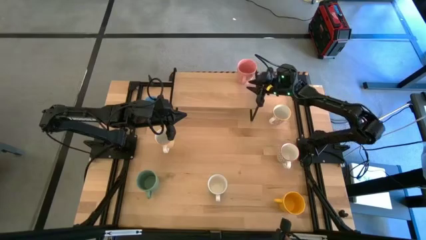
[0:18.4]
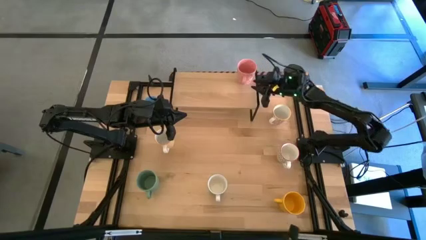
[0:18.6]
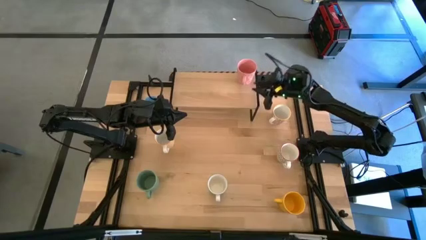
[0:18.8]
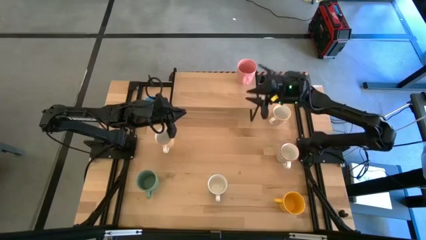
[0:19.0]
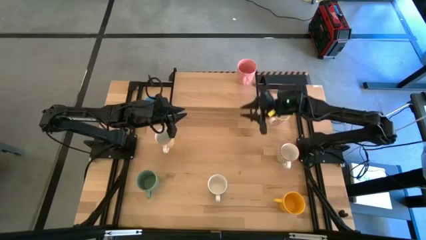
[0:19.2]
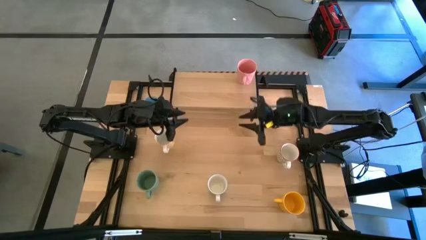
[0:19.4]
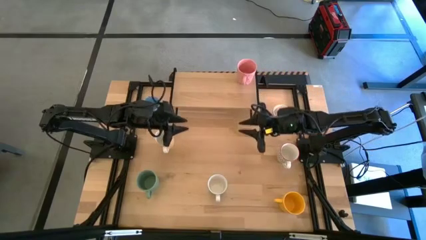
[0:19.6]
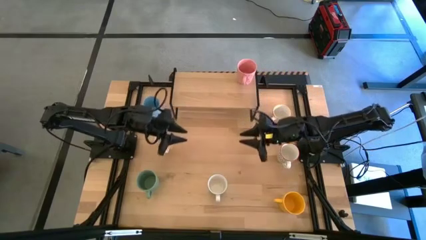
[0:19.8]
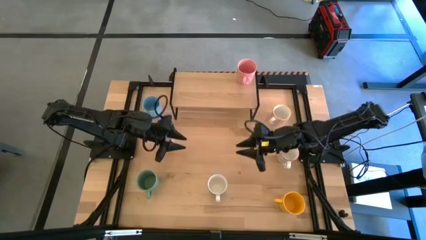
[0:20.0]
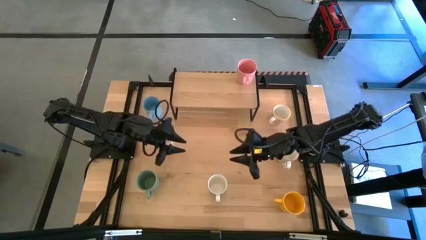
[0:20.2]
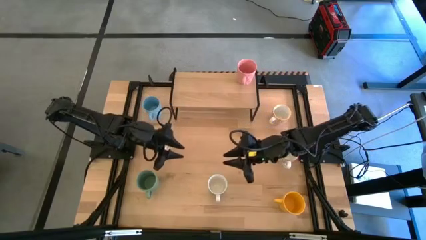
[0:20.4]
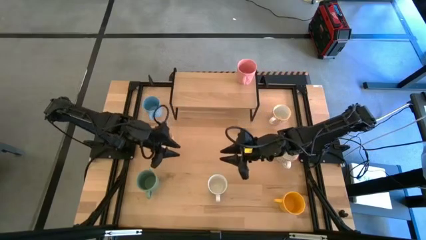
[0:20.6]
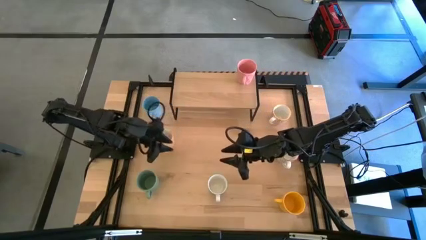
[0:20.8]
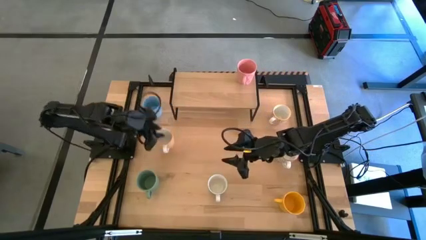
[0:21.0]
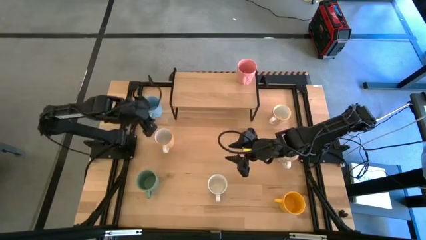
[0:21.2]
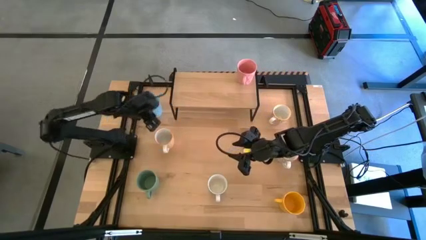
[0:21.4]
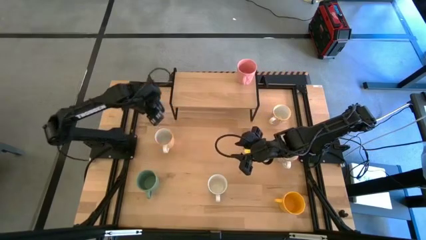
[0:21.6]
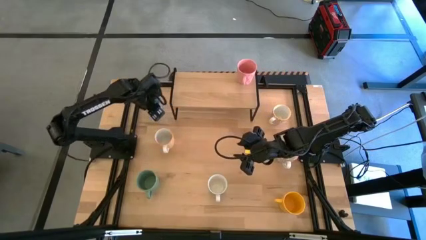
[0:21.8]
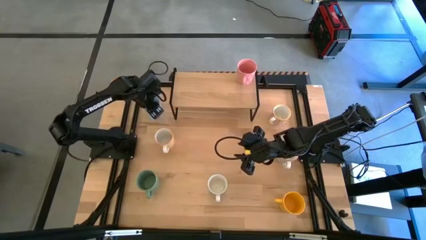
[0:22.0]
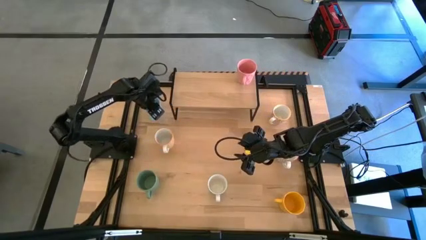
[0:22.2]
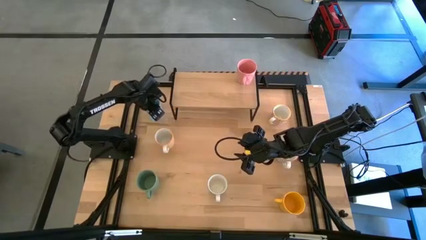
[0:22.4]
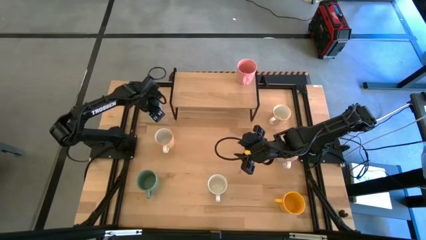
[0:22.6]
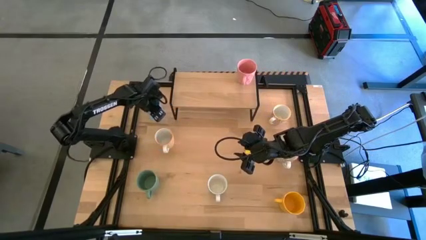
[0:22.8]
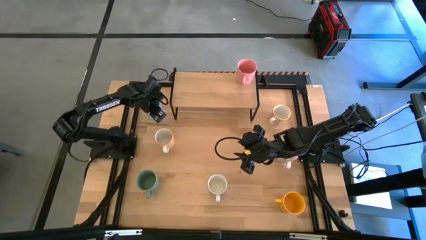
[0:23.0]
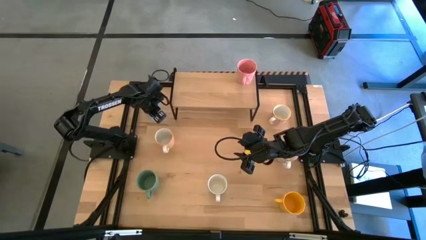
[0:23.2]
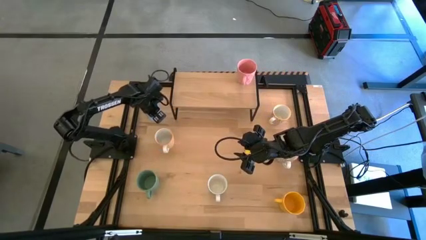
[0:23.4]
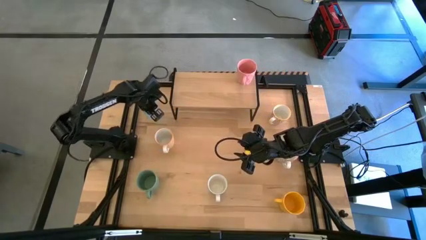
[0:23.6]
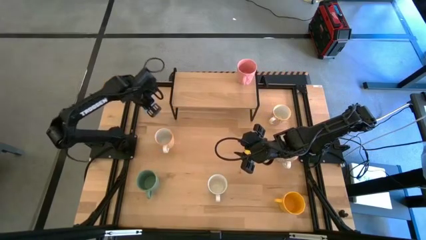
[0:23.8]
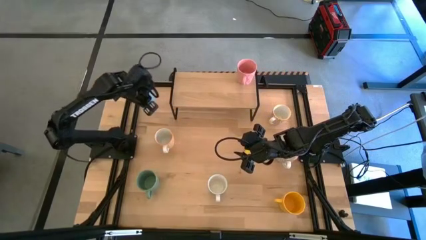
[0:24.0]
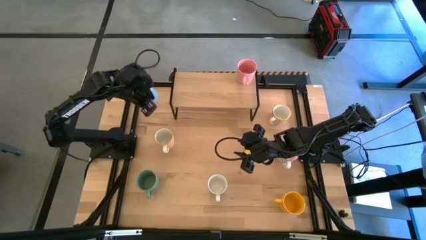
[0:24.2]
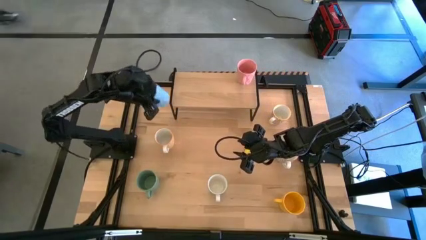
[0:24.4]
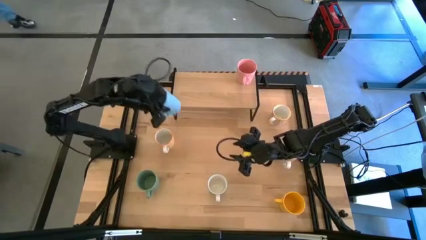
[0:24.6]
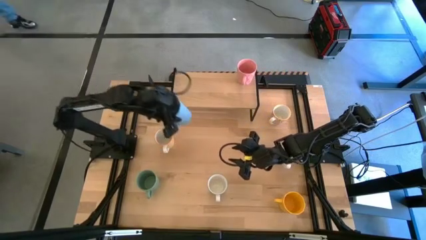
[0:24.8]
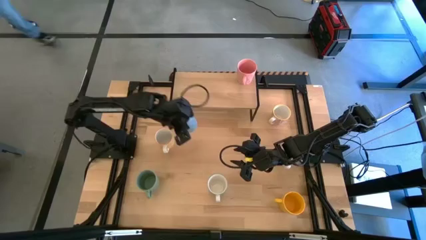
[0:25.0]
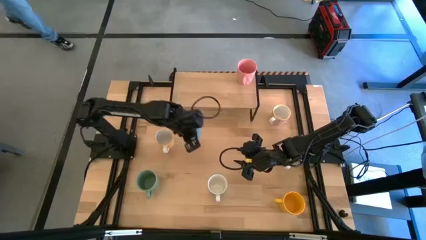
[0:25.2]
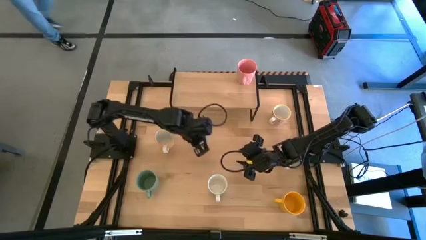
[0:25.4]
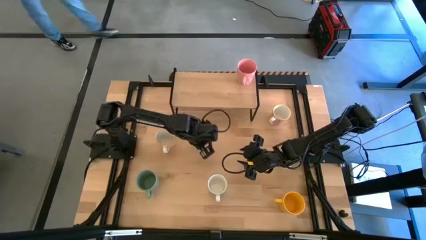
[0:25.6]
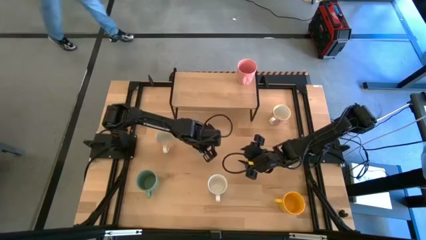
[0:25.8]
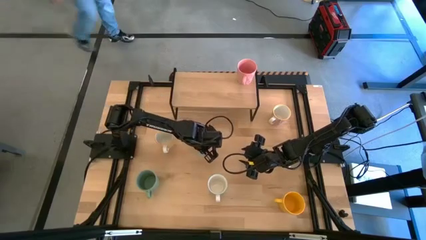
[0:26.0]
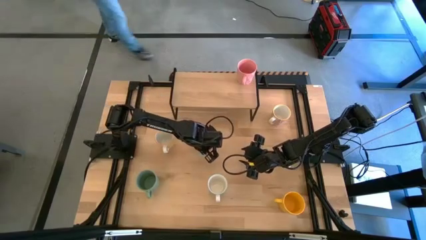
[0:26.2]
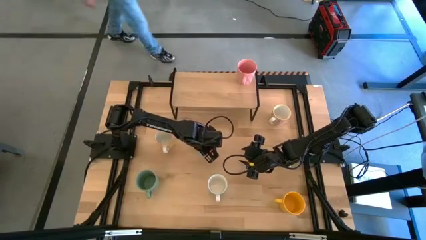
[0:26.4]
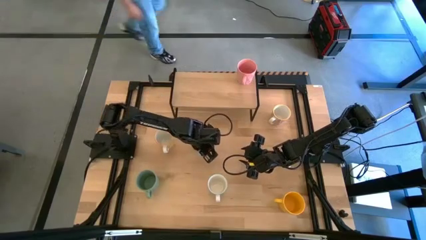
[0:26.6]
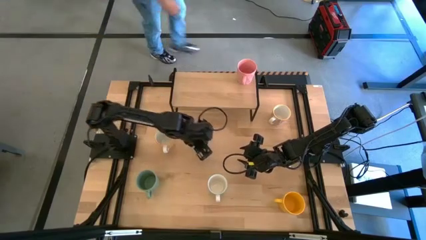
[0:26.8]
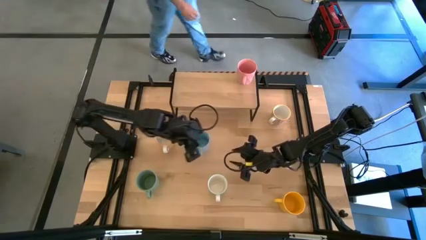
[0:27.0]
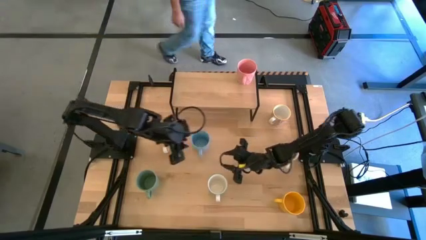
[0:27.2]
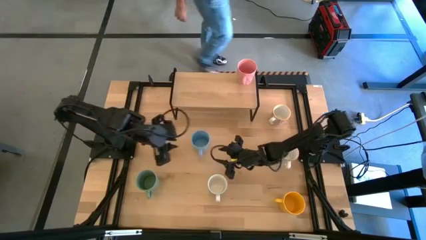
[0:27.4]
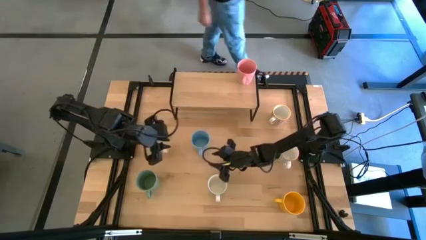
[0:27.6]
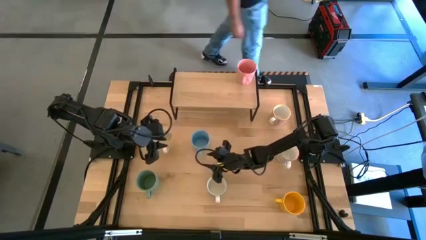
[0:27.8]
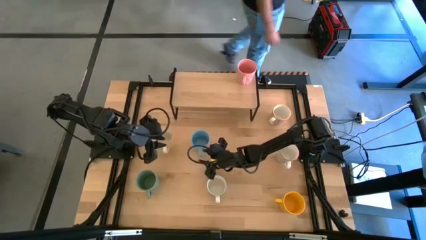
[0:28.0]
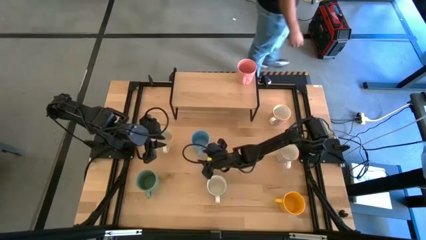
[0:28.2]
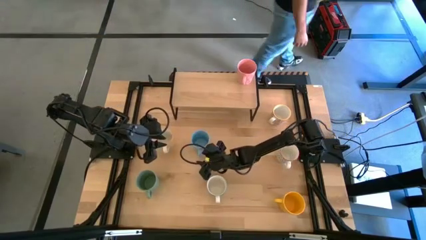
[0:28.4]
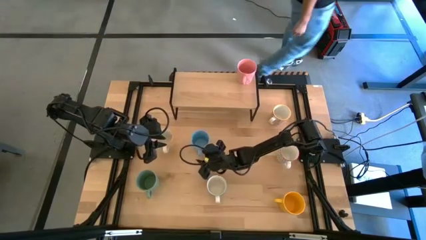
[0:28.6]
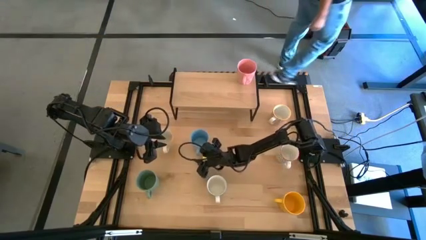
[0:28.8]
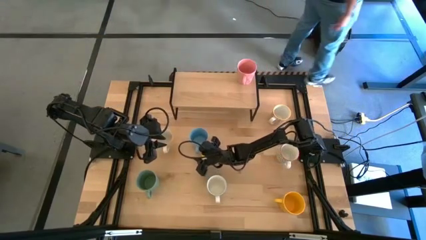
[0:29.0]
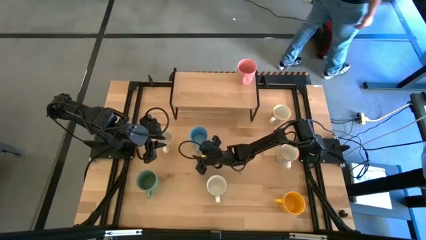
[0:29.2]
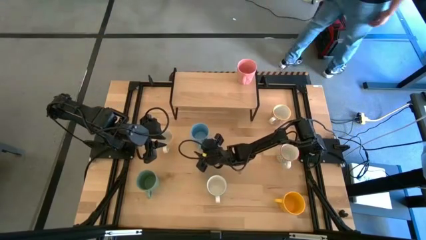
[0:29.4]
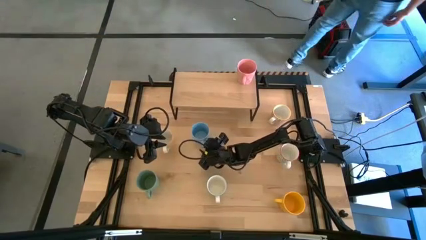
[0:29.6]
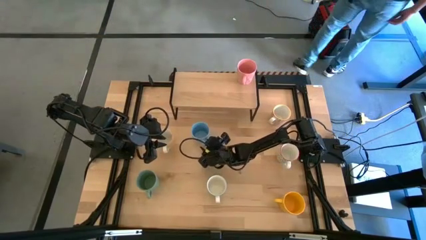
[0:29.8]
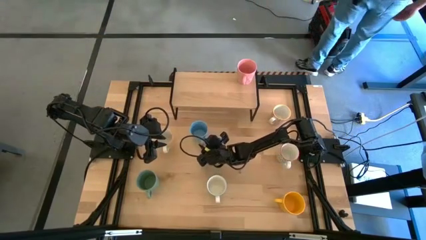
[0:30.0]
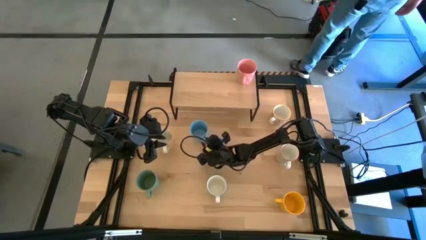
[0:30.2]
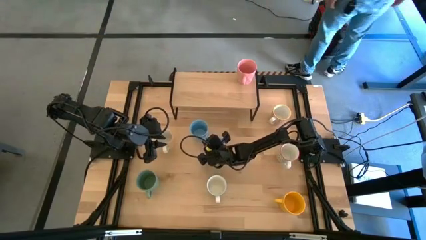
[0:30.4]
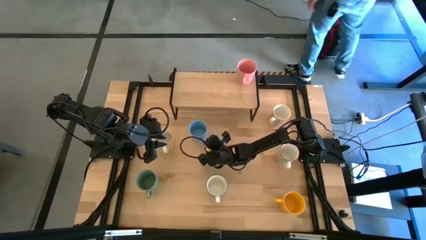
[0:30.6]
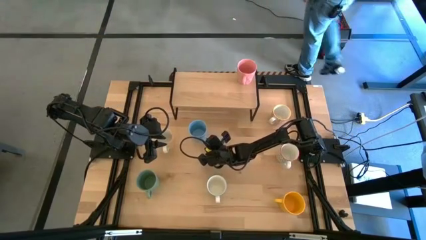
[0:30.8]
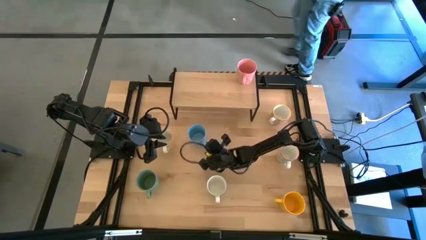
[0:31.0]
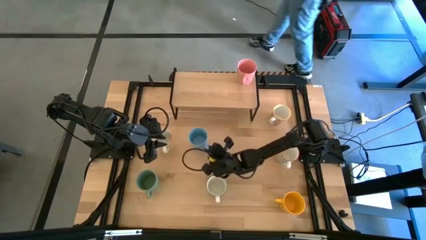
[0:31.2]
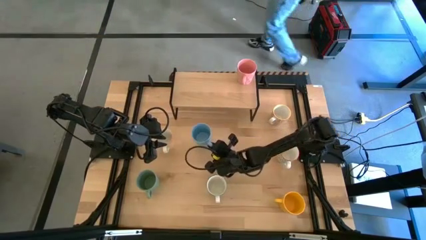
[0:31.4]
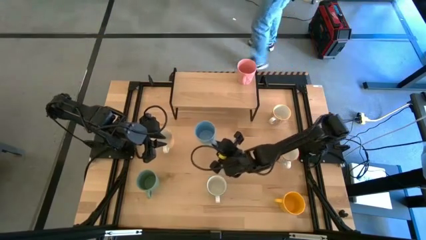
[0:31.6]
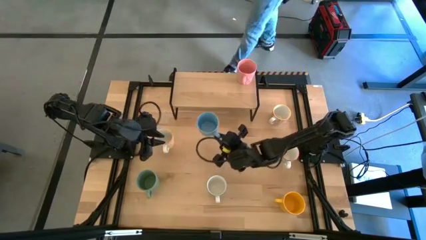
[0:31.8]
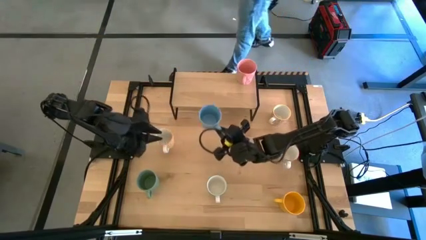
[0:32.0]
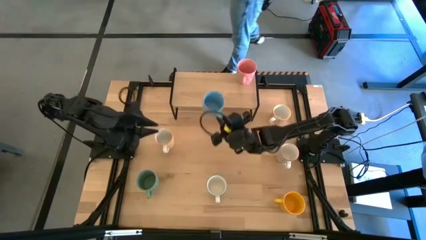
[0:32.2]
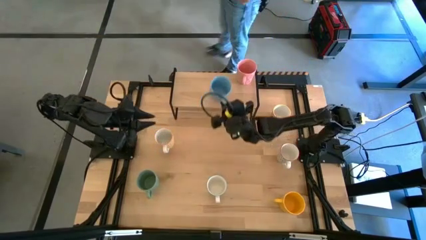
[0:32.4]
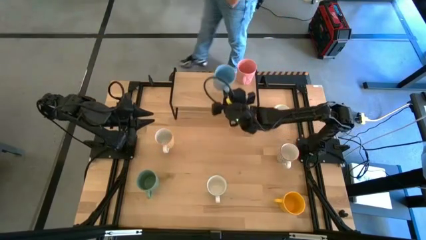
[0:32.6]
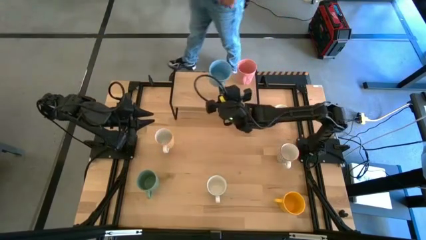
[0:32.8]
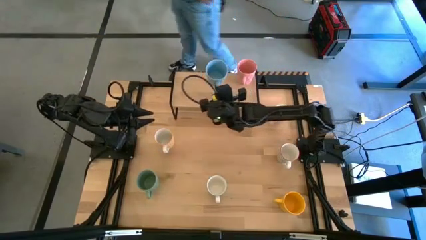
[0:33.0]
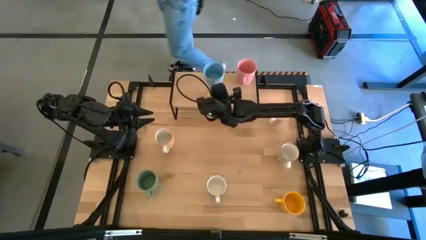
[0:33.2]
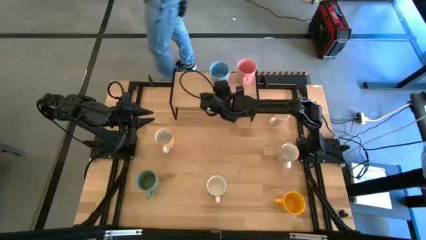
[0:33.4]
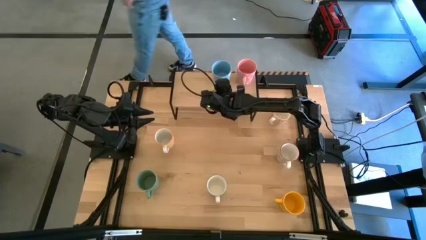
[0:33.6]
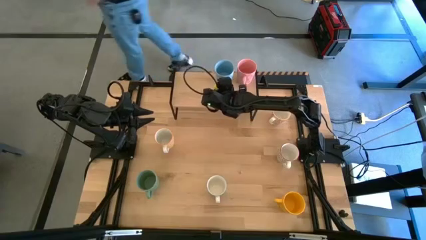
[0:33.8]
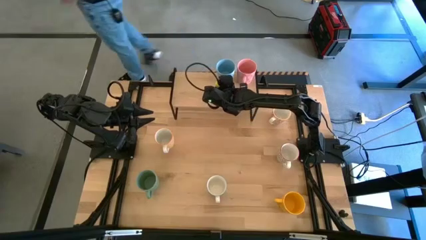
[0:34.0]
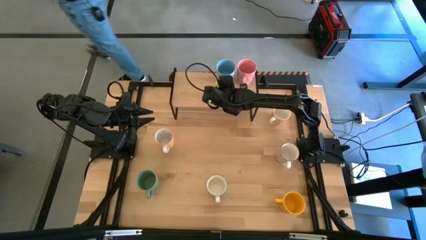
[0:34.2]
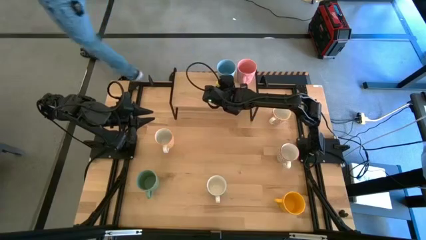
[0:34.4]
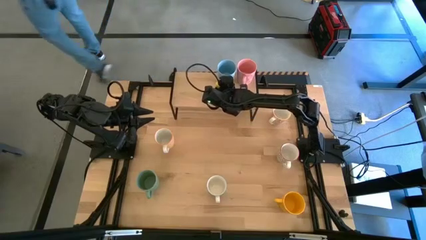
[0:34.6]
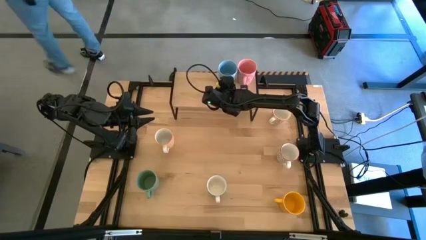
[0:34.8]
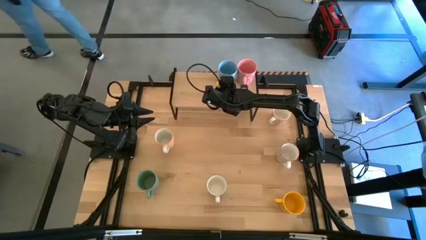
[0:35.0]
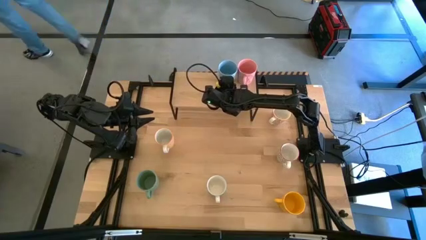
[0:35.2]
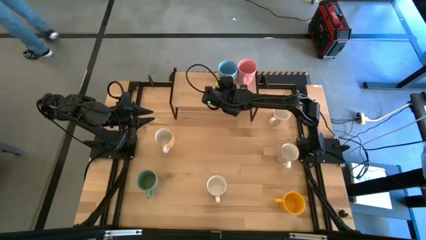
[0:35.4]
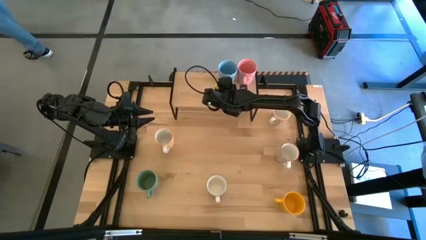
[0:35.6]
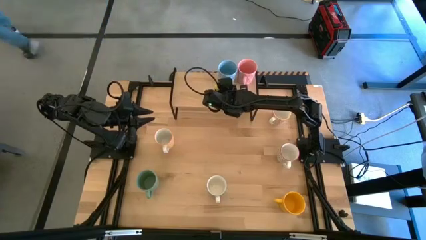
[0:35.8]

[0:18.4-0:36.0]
Task: Place coffee mugs
Put the blue mug on the shelf
